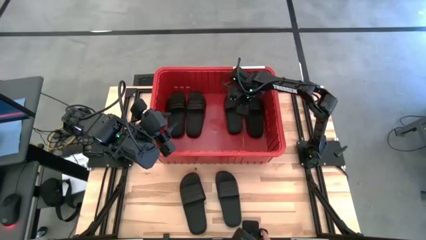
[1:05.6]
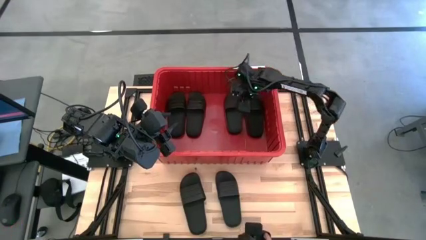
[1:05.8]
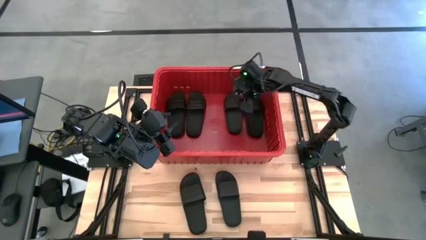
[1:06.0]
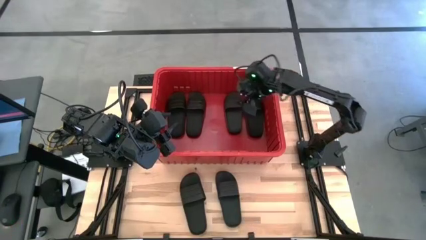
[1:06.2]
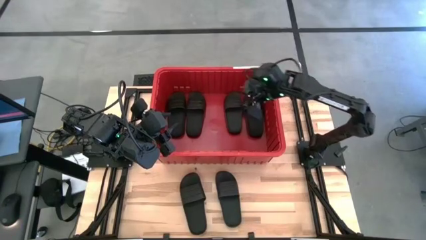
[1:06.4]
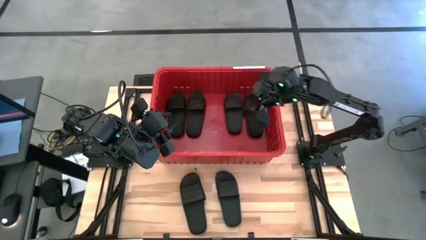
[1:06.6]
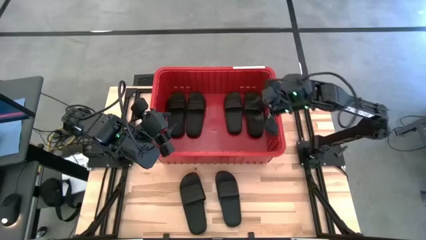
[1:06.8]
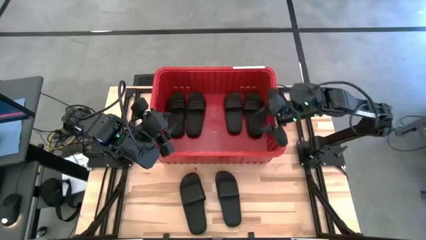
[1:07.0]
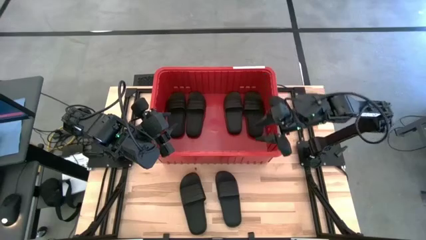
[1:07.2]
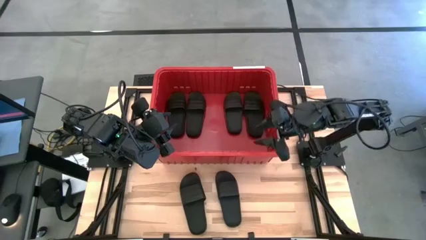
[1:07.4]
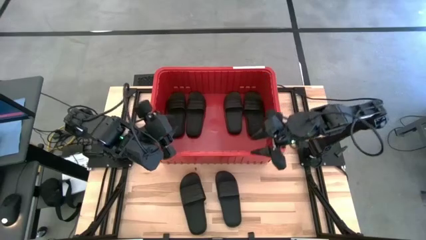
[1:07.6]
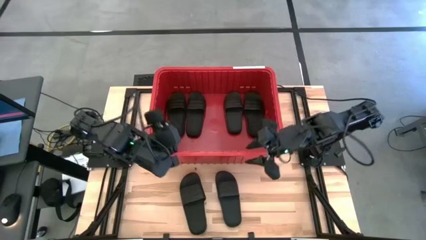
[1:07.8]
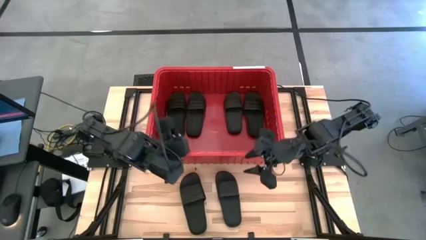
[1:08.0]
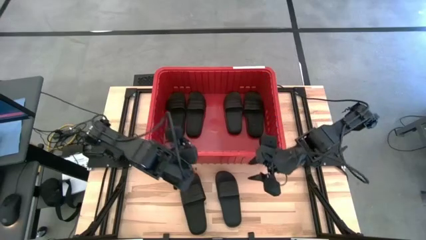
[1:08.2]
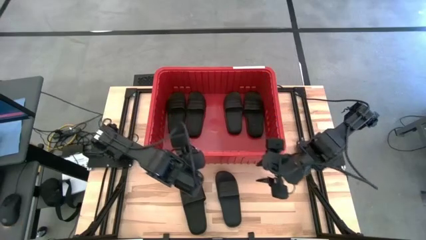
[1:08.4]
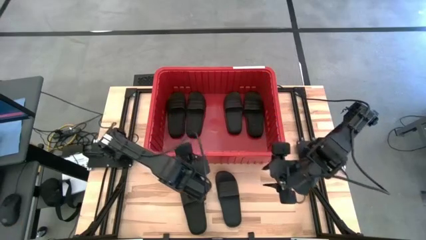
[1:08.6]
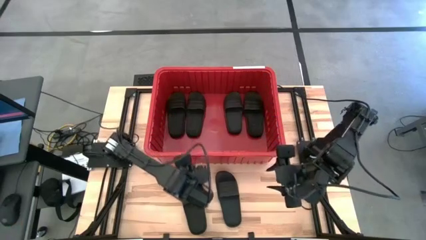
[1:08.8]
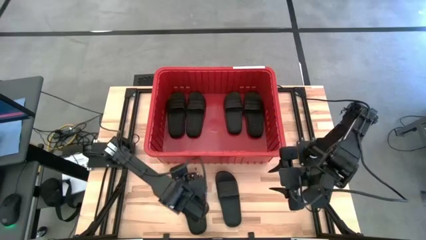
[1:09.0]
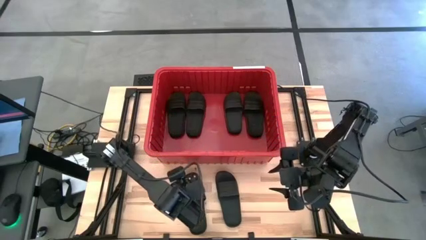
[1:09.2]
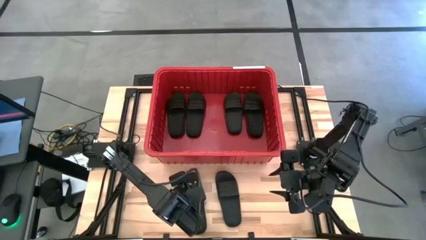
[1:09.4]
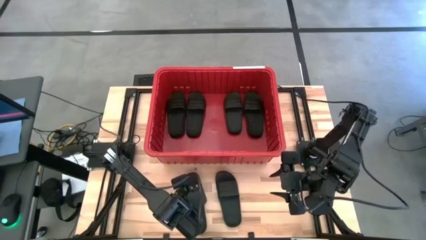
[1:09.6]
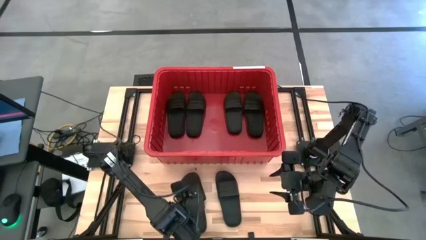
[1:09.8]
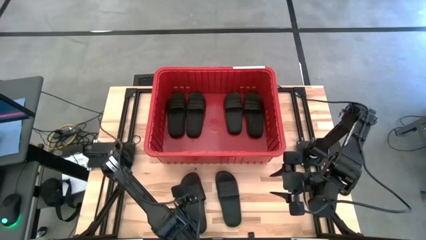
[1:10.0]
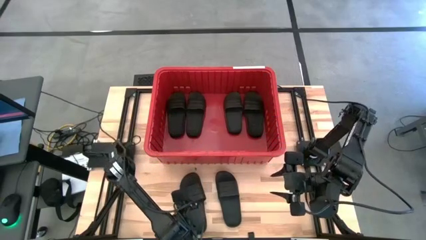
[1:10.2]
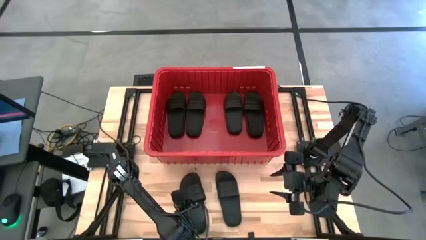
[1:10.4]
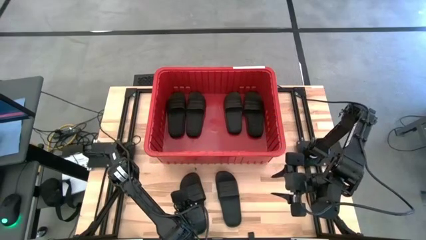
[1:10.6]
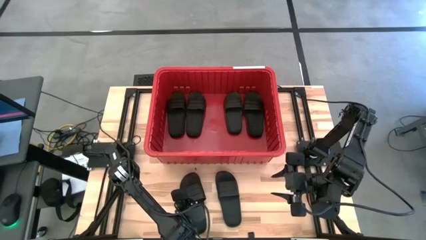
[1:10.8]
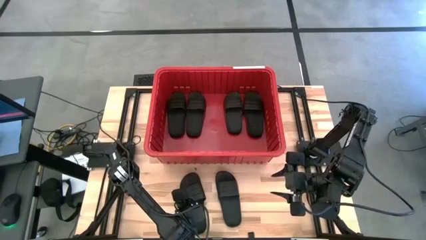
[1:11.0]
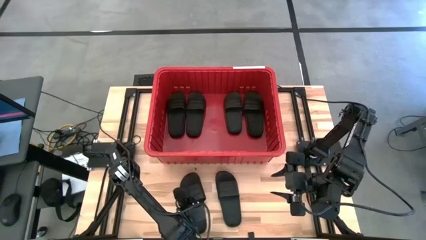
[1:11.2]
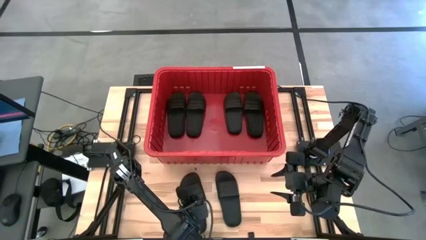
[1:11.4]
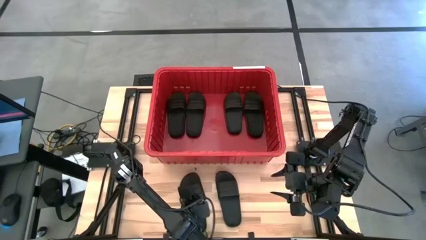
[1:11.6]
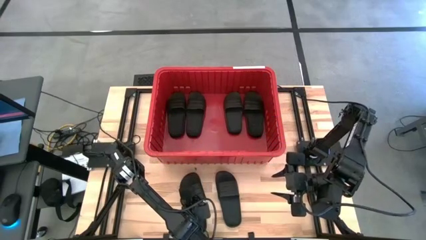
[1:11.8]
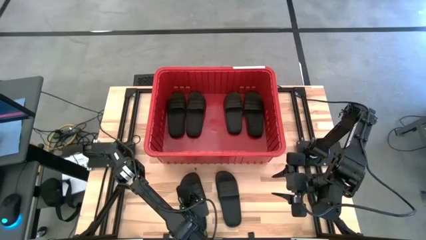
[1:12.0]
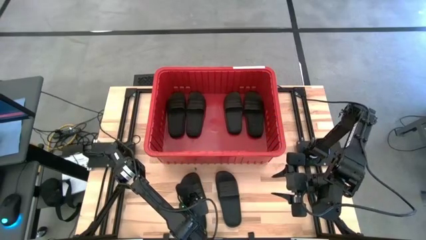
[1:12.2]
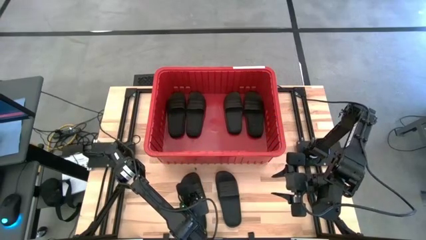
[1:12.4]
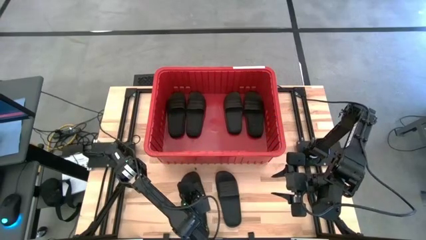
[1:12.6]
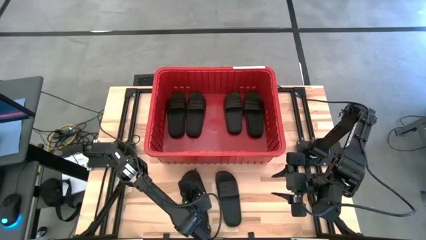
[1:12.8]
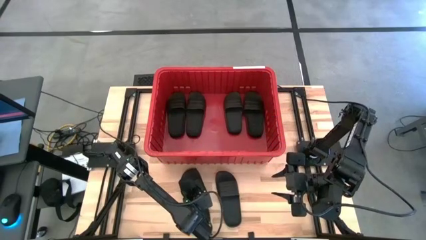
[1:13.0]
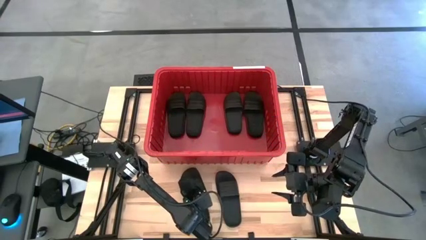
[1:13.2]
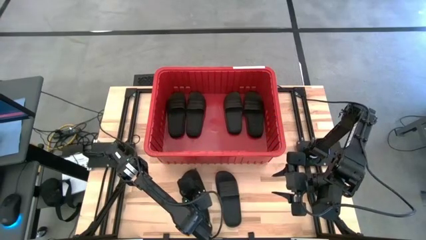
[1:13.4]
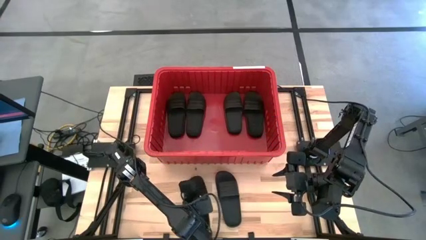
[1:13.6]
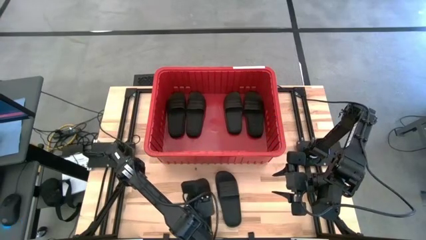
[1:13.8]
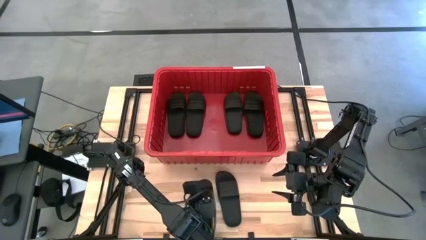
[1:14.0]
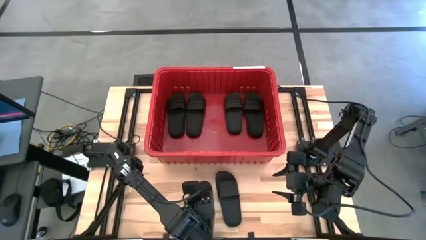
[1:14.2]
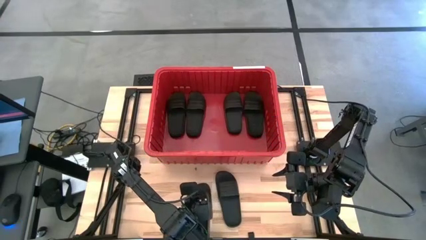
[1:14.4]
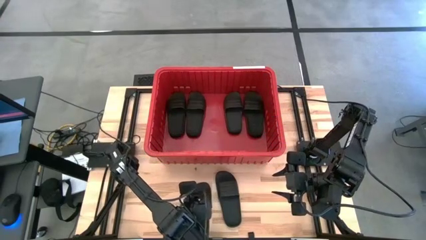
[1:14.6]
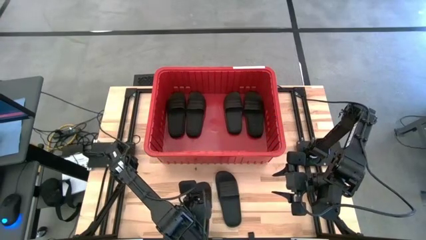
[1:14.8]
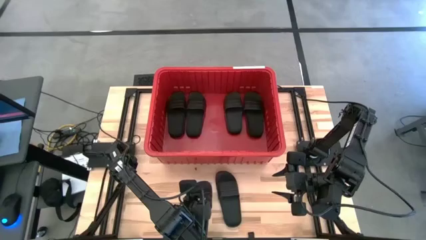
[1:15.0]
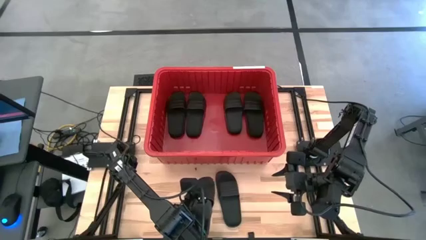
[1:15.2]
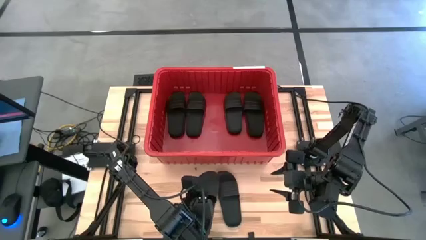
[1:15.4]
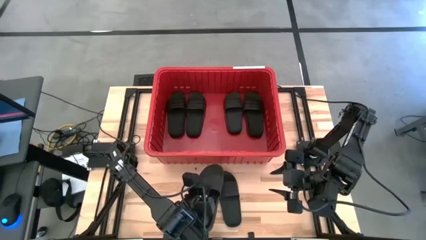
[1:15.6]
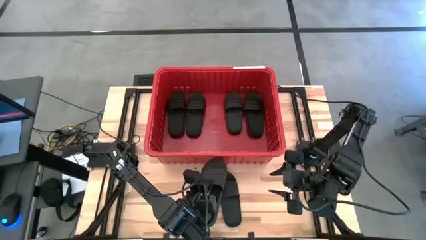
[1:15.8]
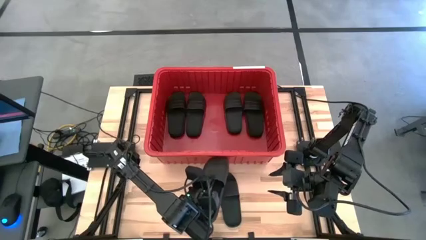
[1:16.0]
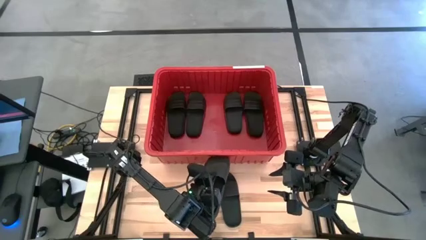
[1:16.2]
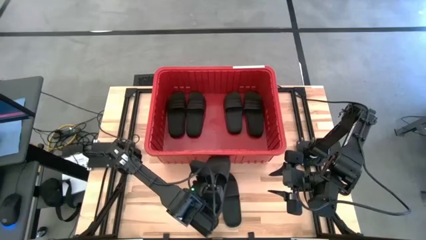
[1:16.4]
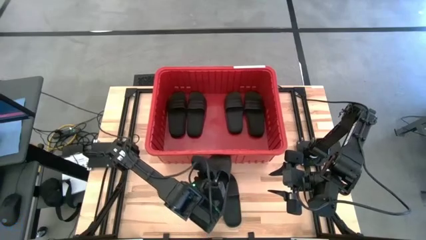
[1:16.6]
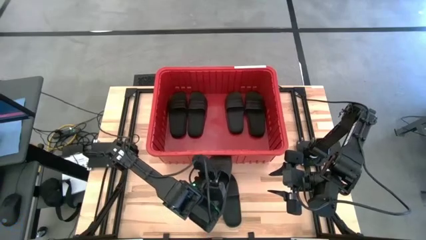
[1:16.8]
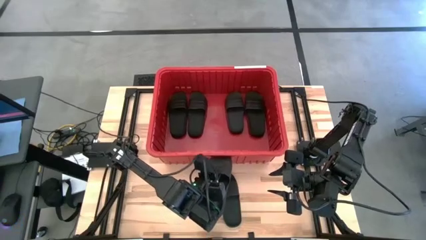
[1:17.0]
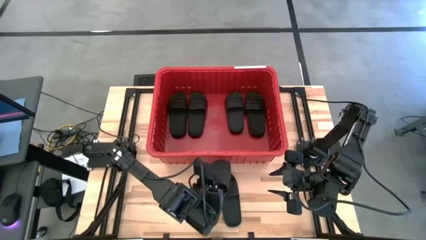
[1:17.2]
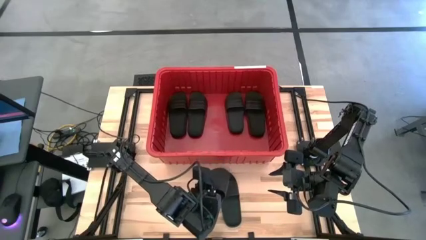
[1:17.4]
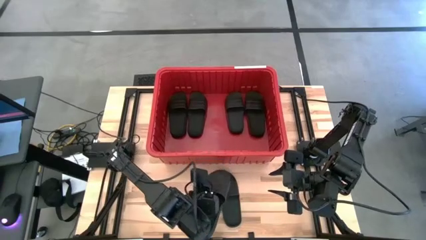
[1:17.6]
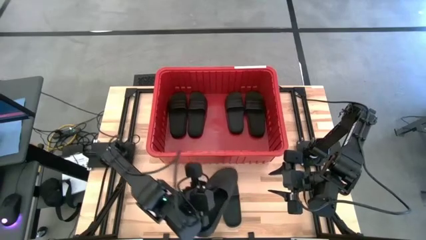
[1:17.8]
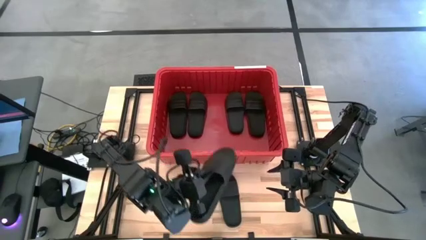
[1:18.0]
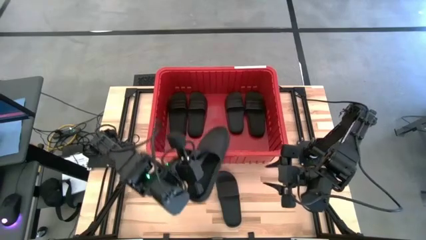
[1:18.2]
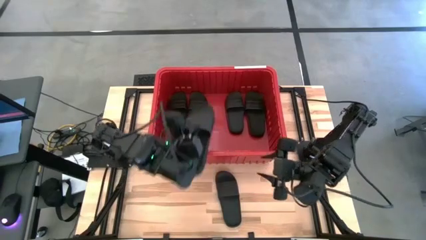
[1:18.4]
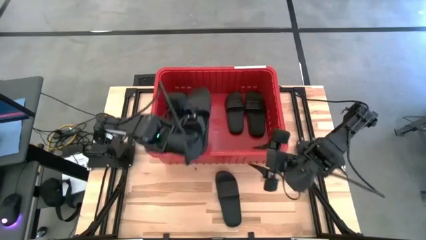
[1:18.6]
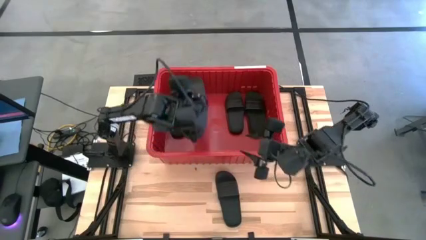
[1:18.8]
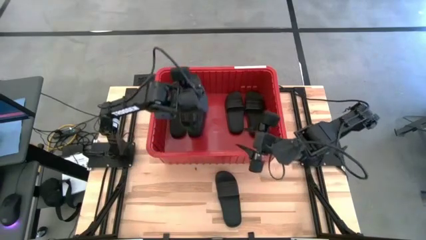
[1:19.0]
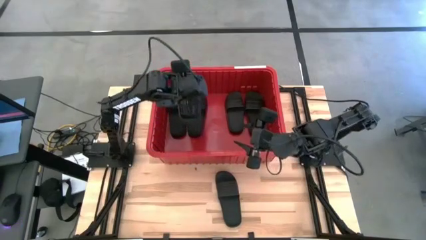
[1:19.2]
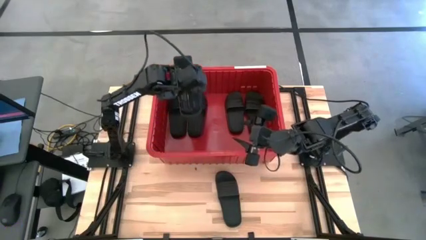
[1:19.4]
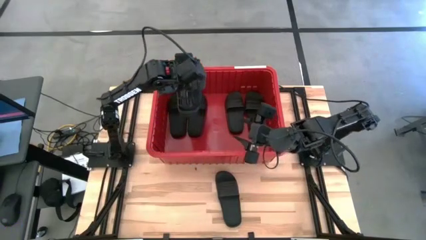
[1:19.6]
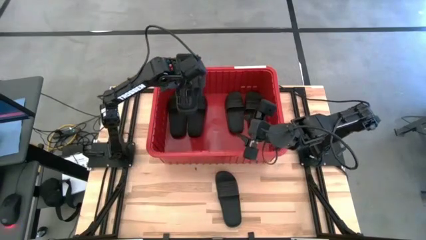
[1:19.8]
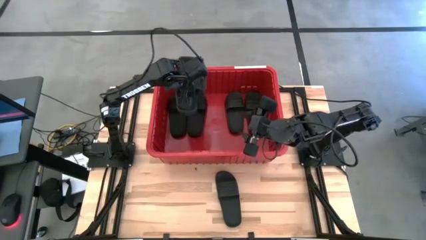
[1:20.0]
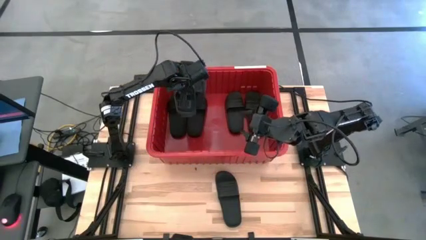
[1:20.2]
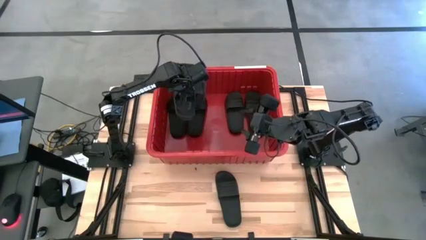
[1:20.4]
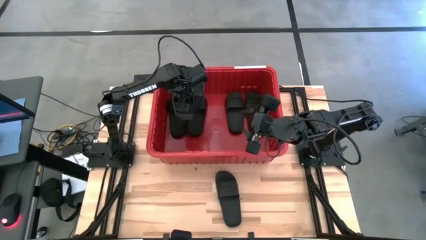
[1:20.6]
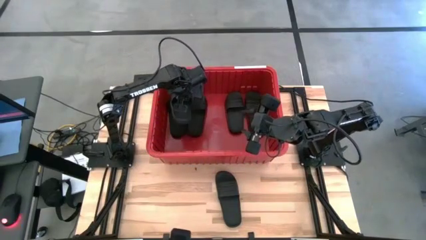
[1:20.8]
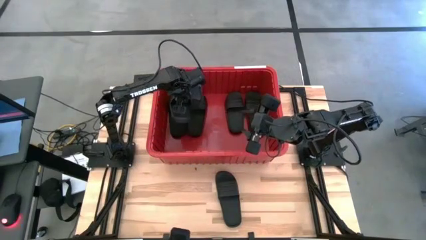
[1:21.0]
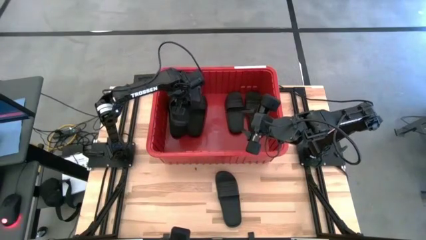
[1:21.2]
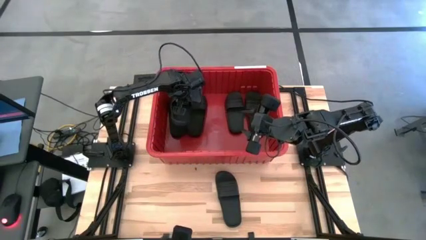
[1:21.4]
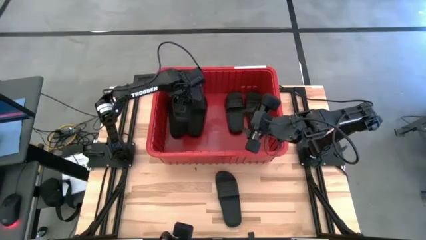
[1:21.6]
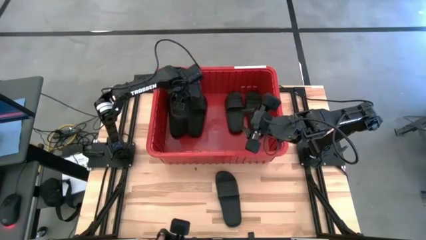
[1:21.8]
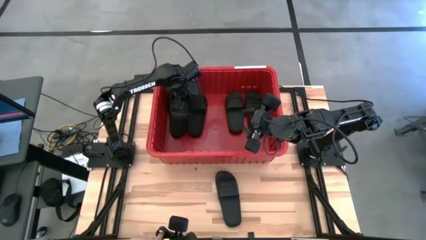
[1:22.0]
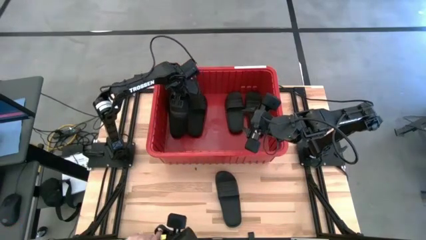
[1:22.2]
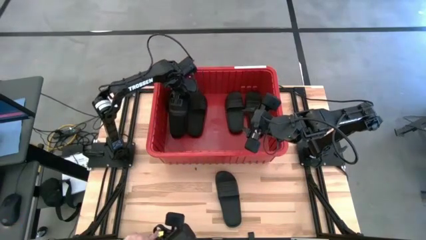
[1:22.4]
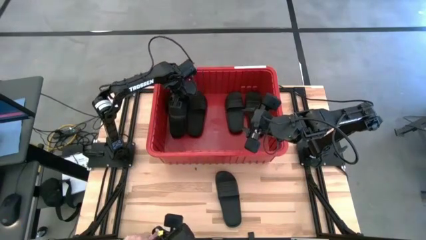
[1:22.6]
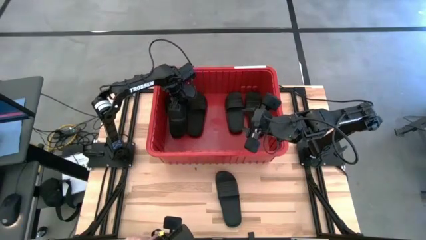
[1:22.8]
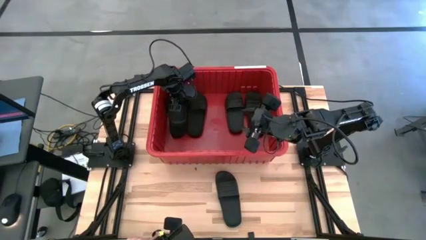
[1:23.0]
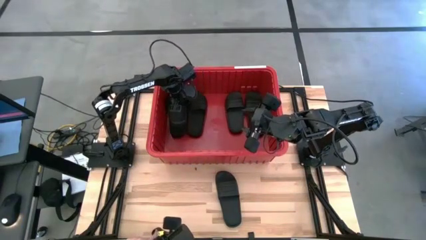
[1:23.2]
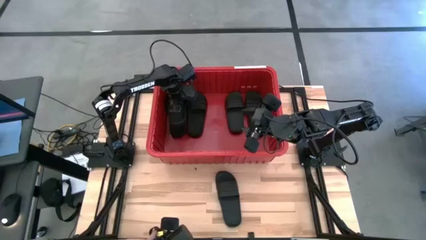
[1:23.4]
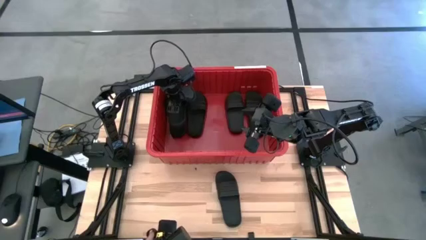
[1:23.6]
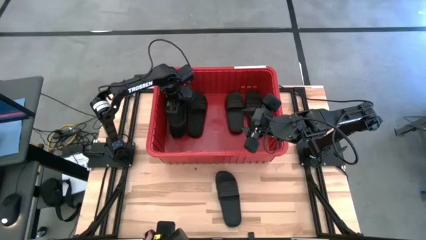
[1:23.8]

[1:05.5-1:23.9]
Task: Pick and place slides into bin
Put the black slides into the red bin
